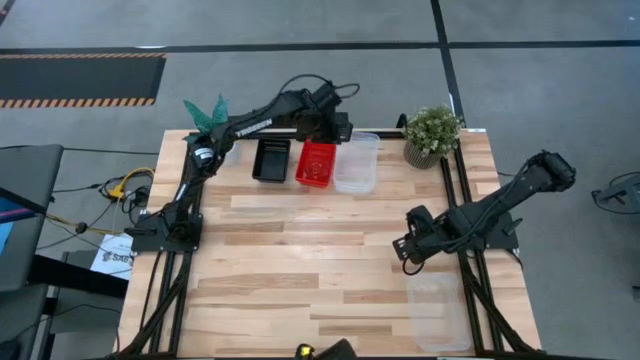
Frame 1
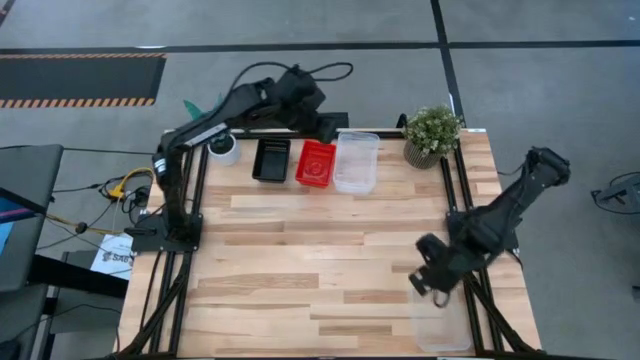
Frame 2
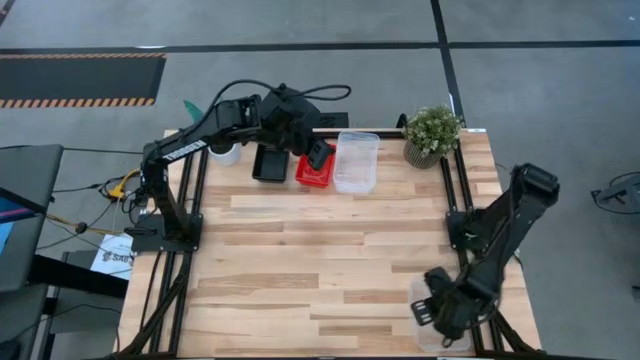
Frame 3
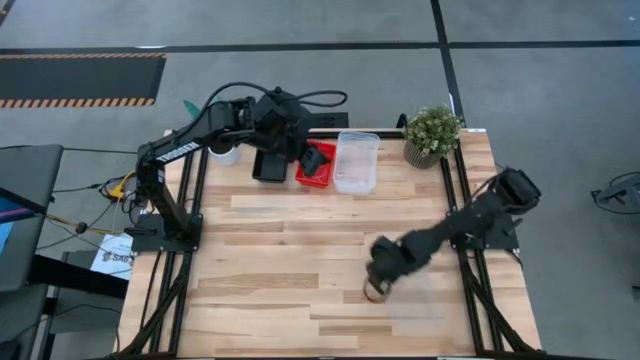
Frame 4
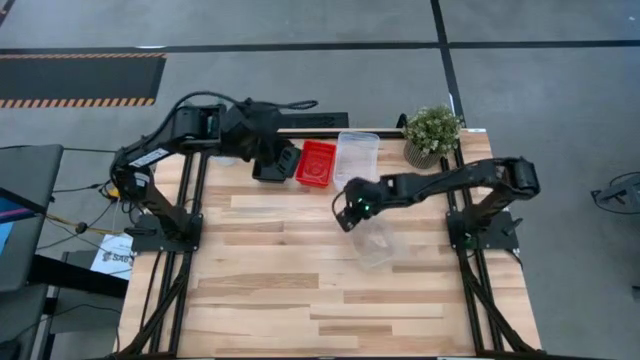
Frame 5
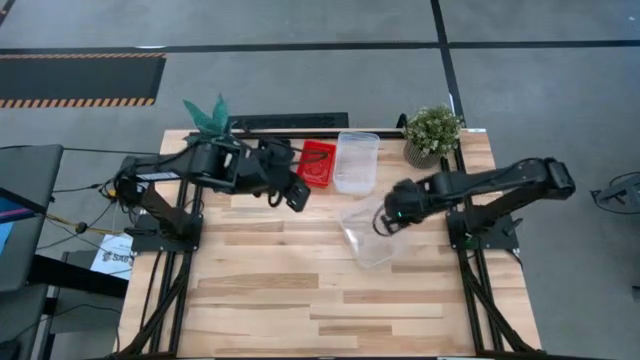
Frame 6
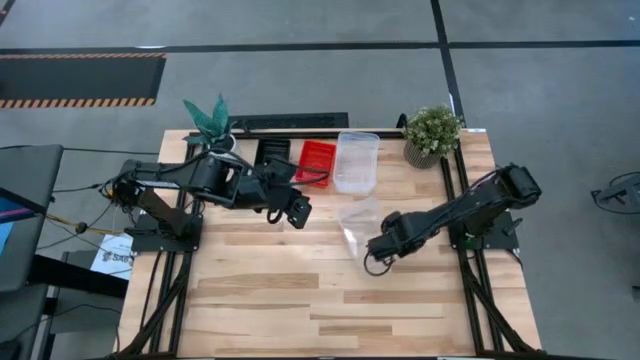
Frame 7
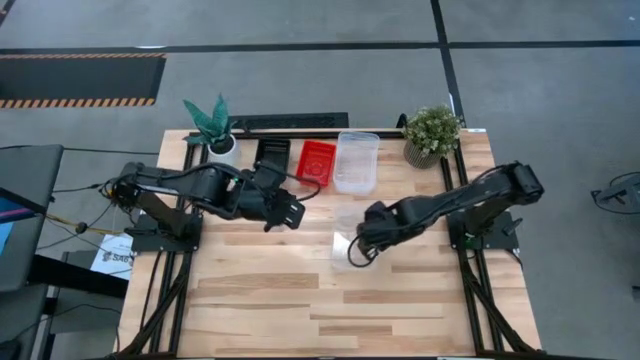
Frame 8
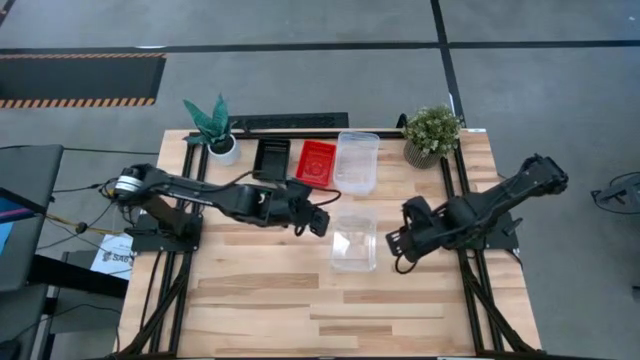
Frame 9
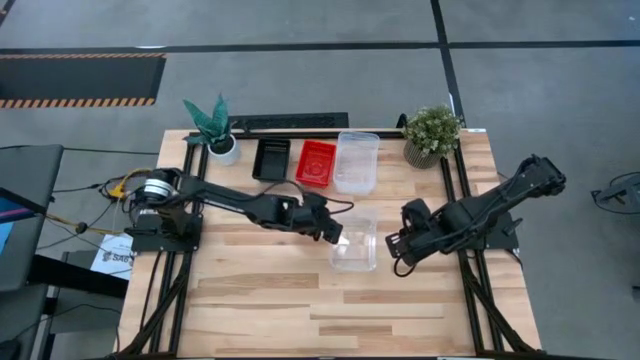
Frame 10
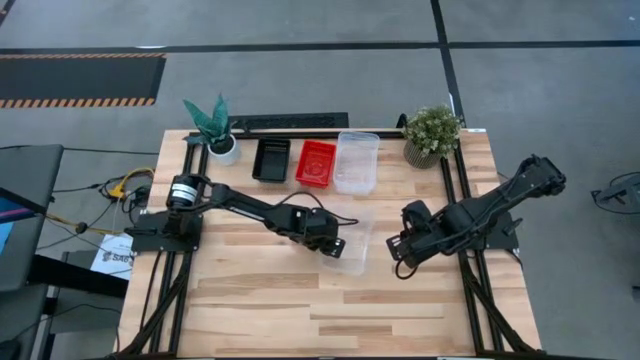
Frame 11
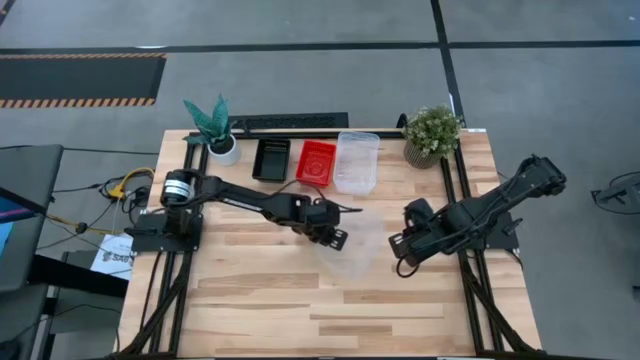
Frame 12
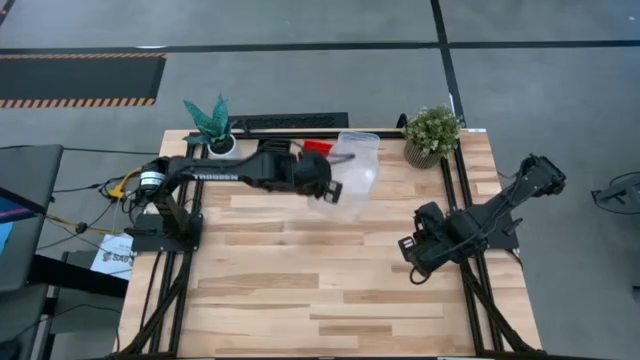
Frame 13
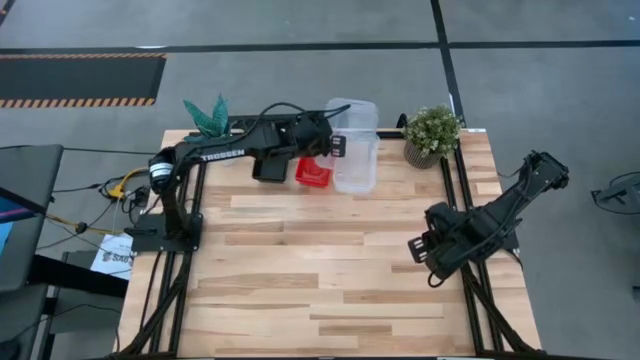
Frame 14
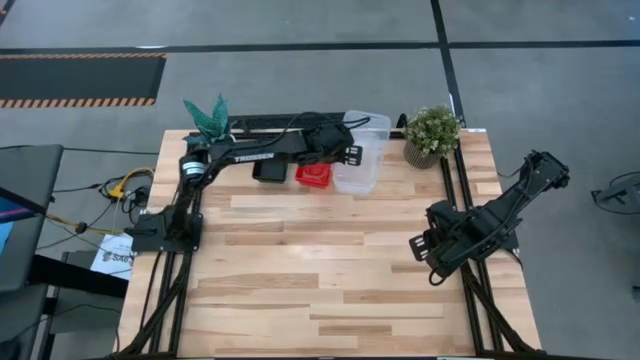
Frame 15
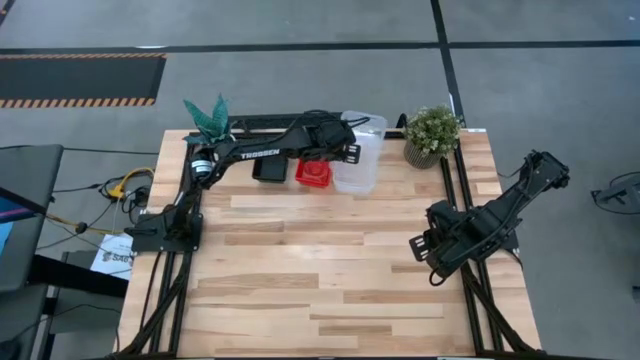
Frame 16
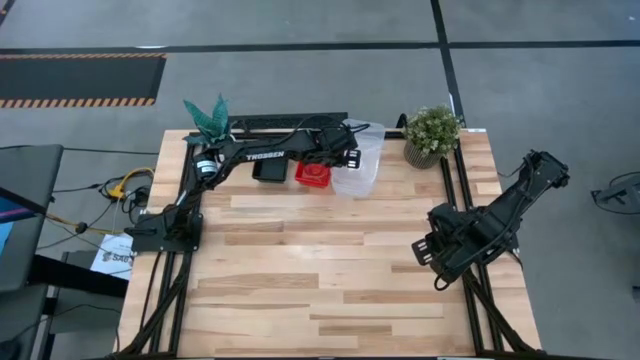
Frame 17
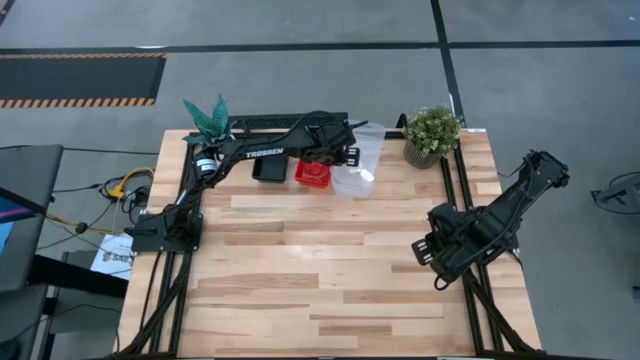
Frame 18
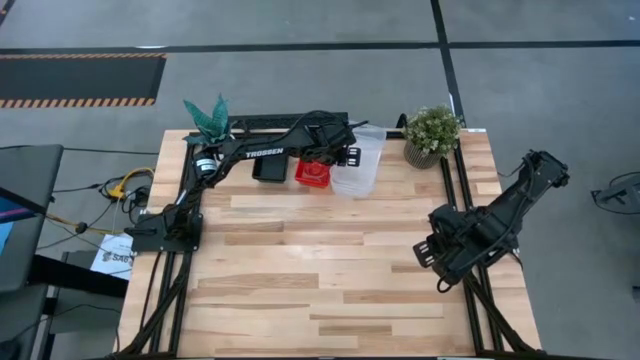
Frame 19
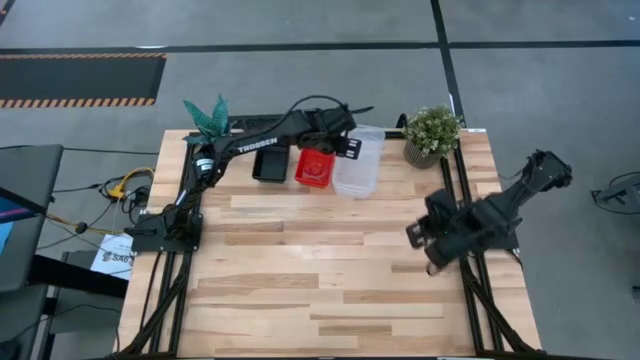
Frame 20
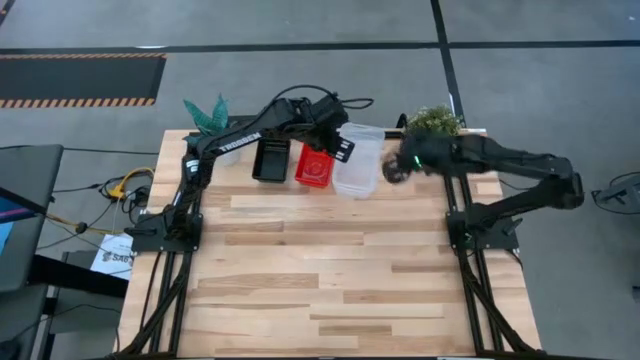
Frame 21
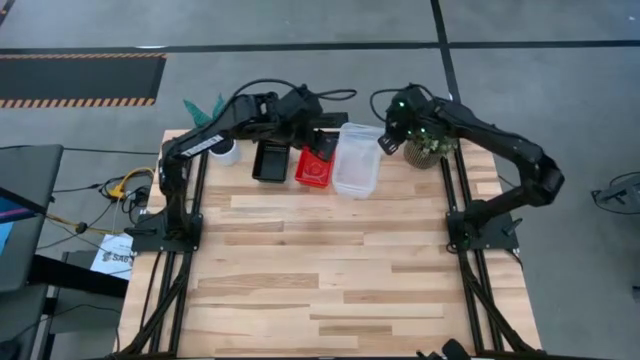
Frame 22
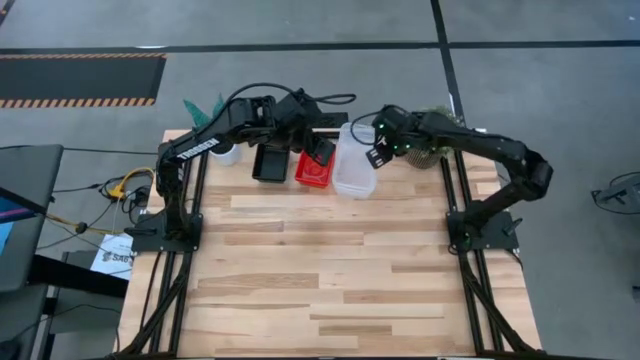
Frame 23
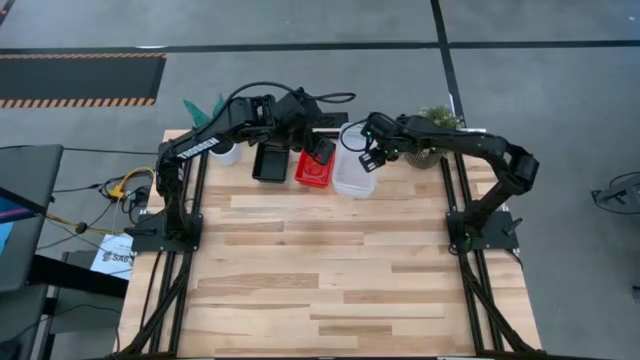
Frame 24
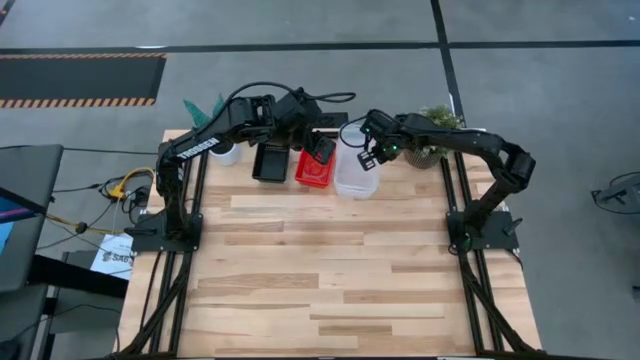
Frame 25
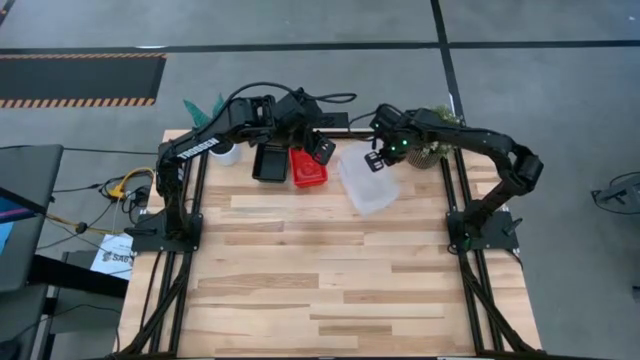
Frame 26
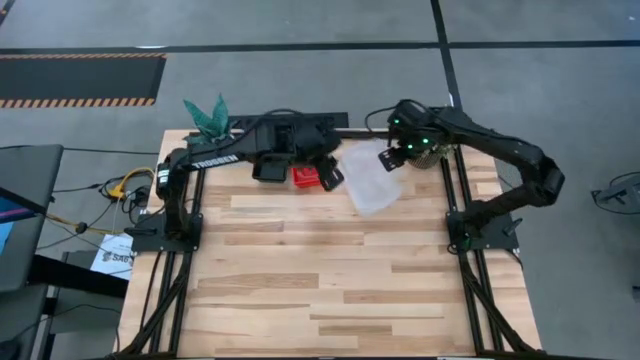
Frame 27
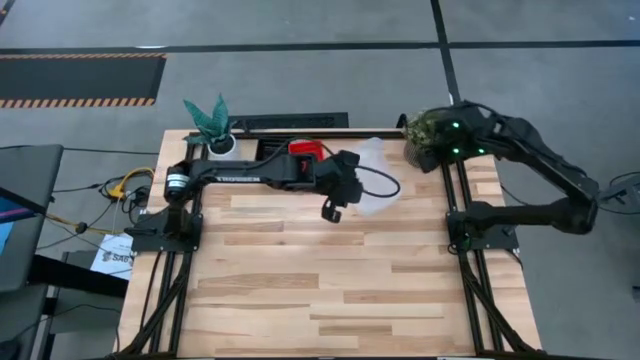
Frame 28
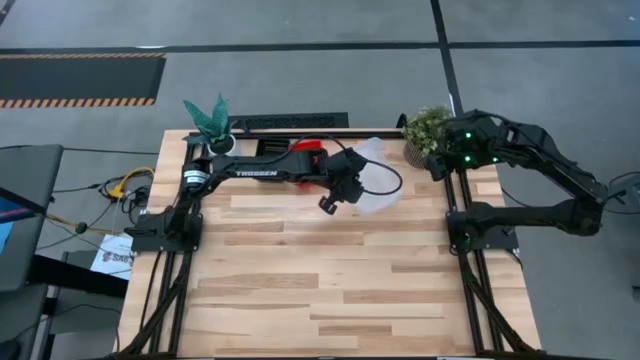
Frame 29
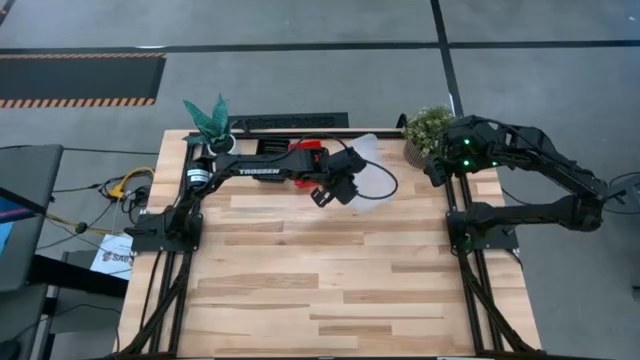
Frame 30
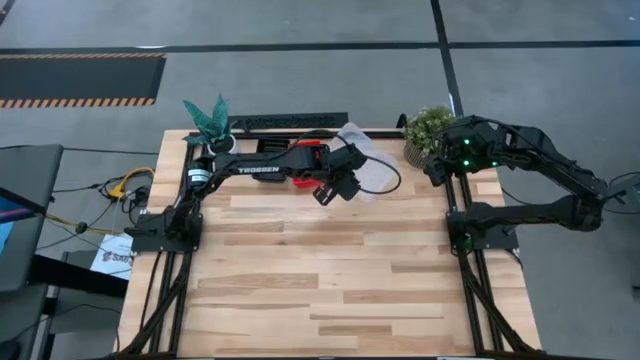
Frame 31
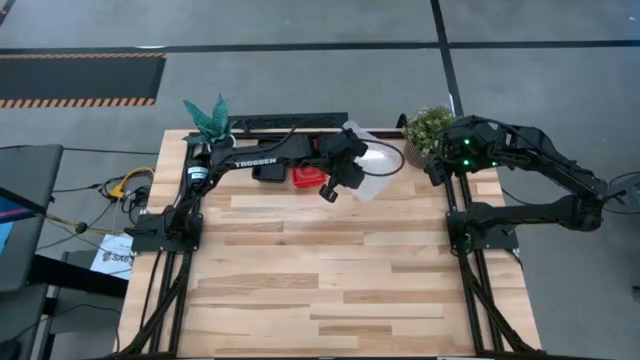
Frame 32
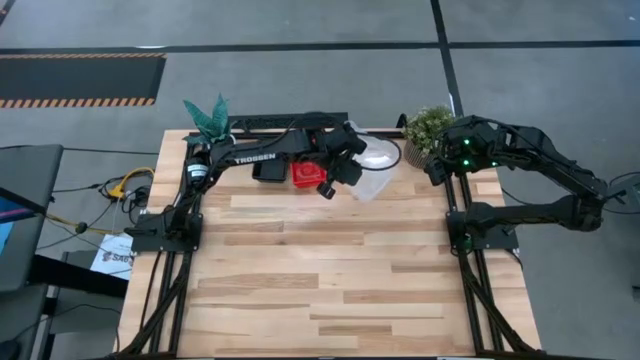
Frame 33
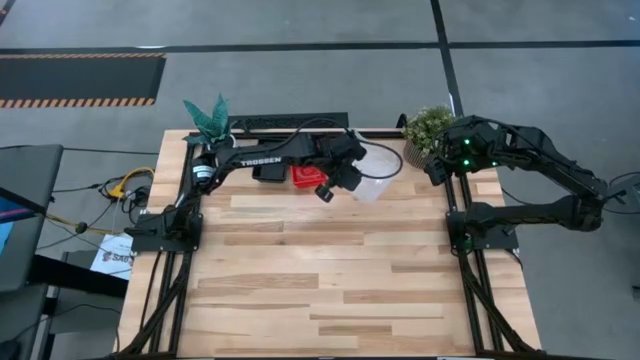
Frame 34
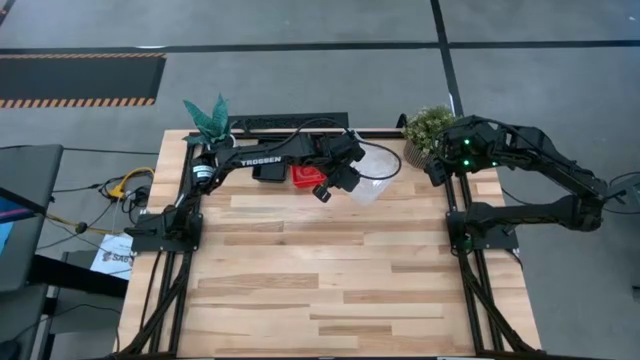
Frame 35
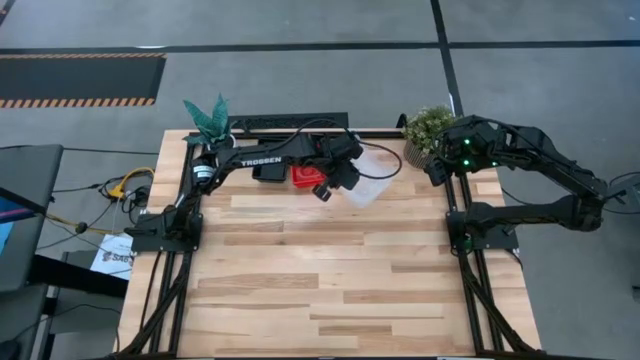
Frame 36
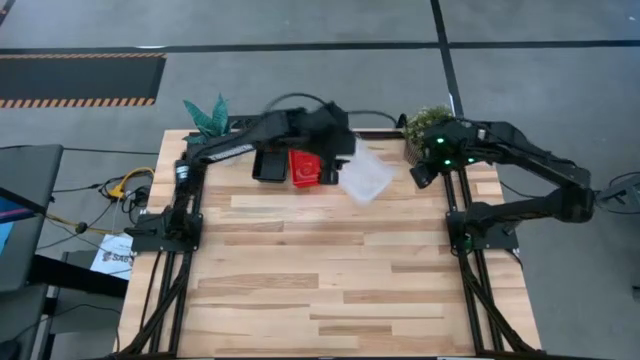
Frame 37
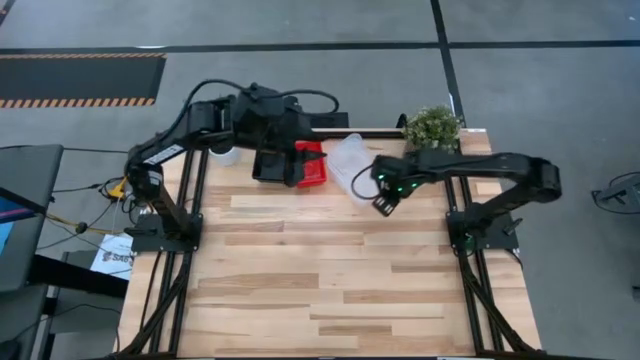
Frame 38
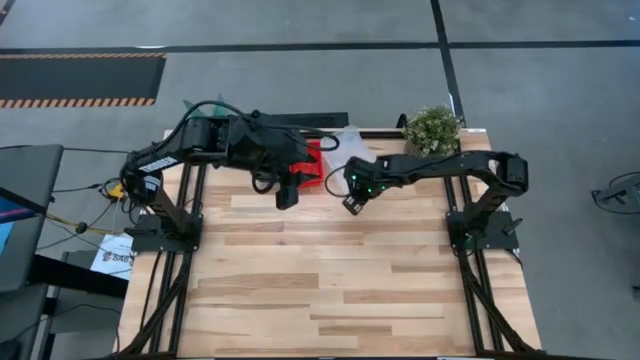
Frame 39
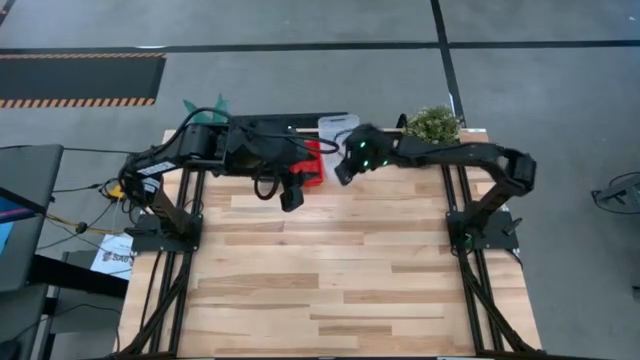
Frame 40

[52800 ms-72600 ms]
Stack the transparent bin on the transparent bin
